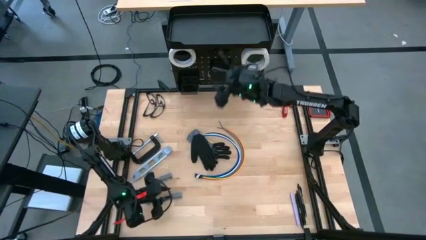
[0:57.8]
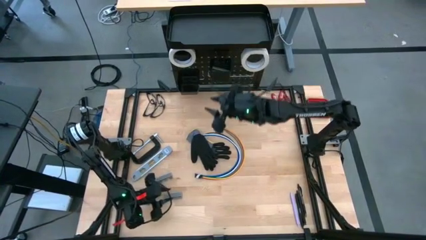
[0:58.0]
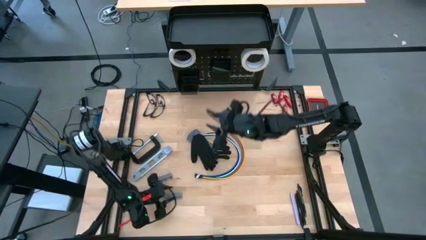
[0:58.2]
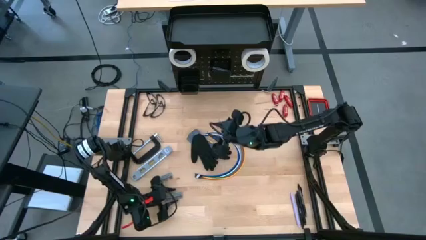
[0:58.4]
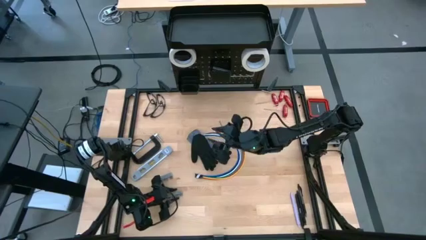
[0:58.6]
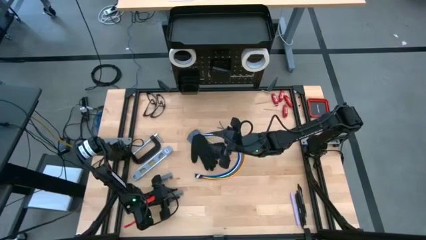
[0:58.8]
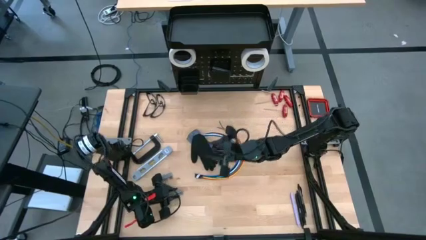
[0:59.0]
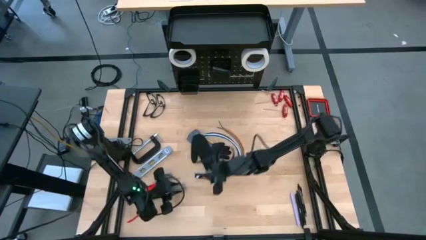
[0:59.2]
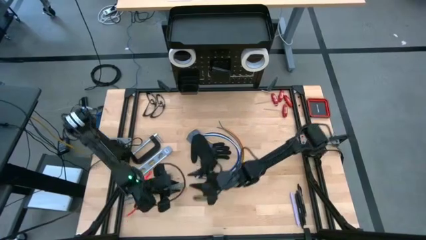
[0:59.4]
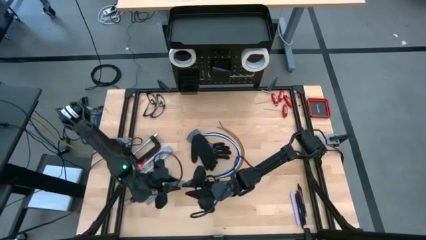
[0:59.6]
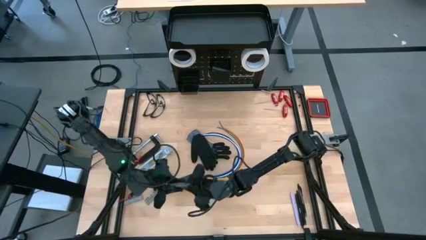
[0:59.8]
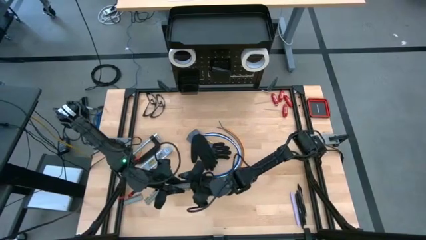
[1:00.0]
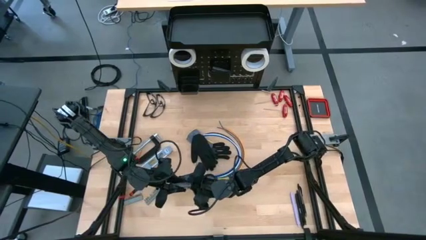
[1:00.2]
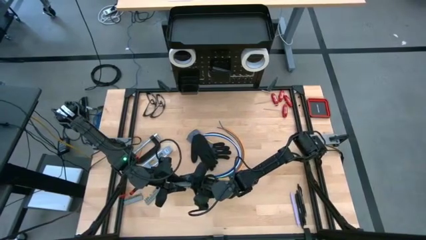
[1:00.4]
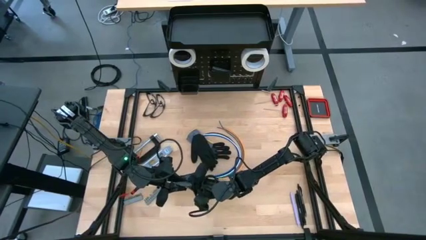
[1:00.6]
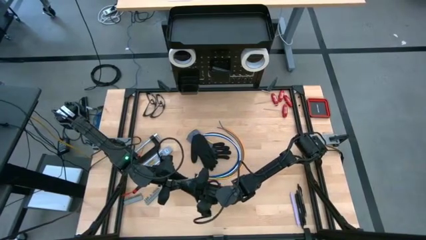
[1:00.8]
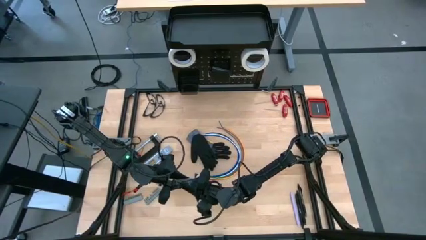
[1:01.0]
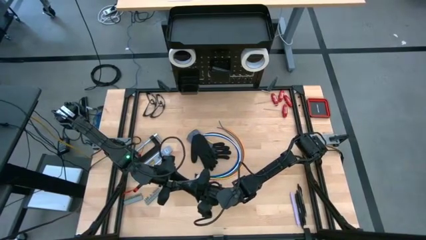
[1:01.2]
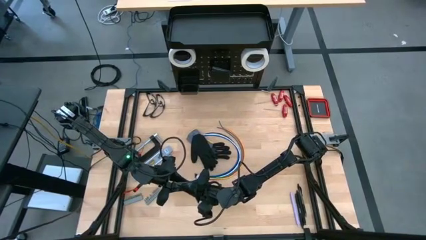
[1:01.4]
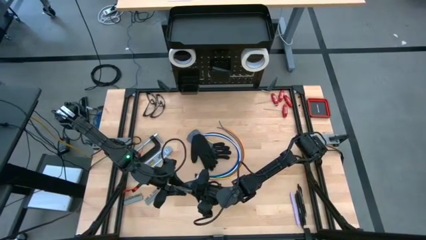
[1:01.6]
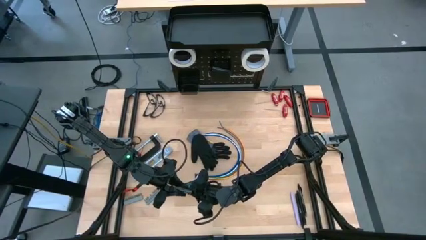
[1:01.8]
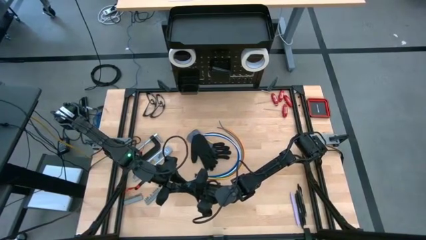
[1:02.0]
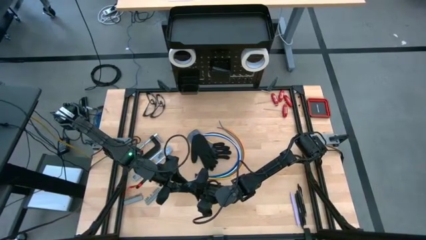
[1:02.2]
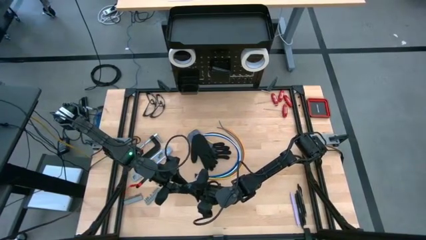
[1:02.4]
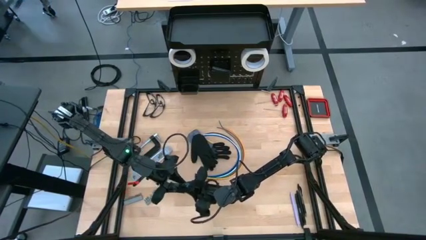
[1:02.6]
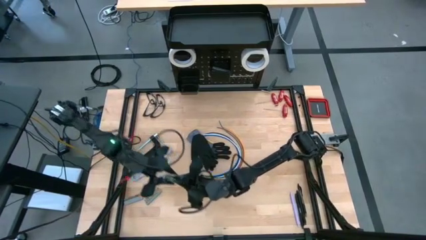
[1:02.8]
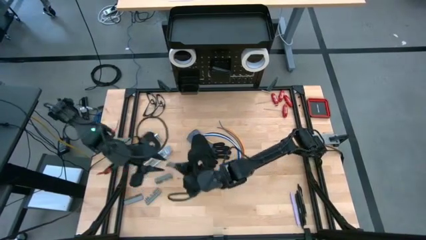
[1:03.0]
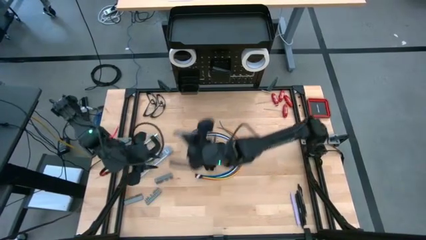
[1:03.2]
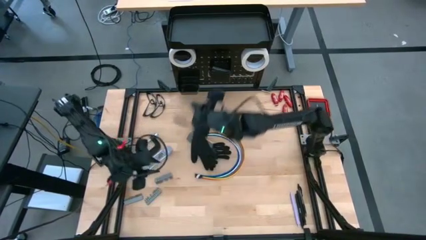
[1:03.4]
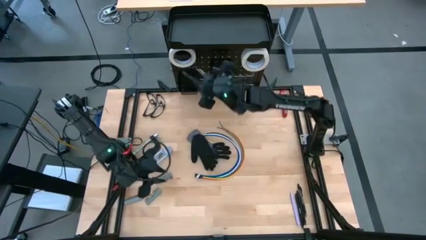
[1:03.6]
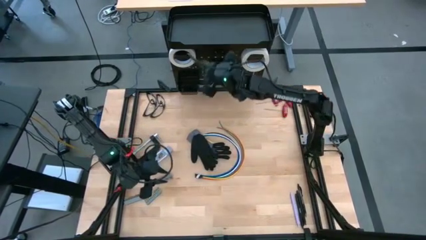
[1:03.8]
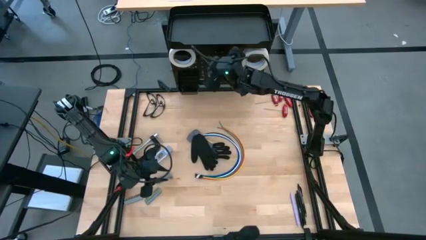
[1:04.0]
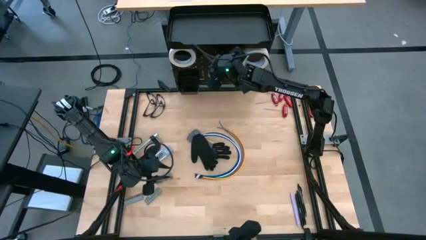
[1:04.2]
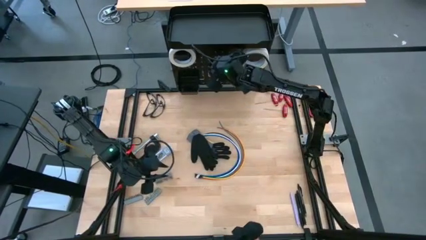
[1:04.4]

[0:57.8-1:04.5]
Task: Hang tools onto peg board
Put the terminal block into the black bin on the peg board

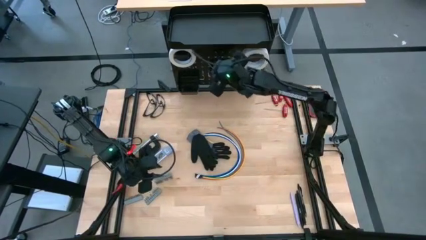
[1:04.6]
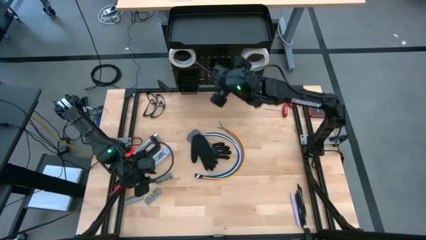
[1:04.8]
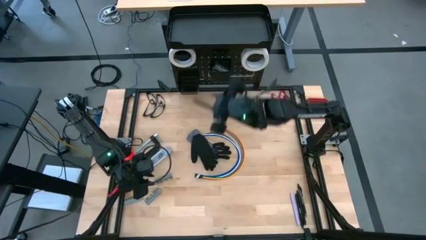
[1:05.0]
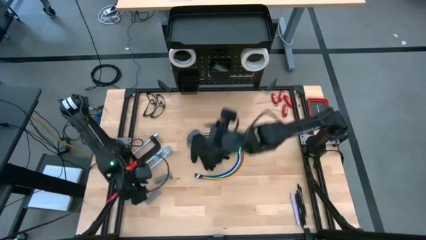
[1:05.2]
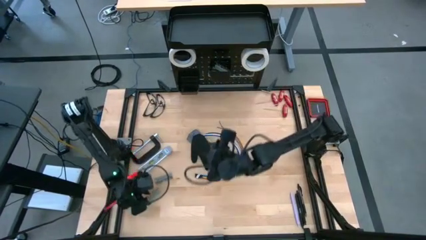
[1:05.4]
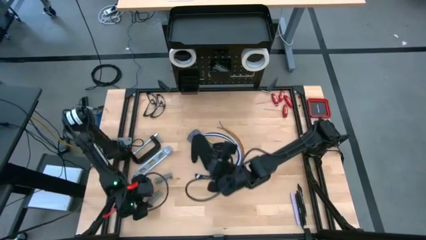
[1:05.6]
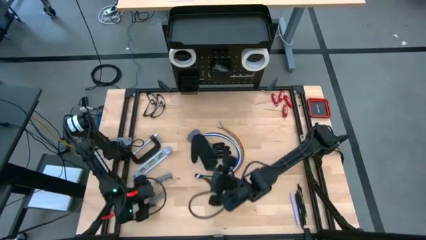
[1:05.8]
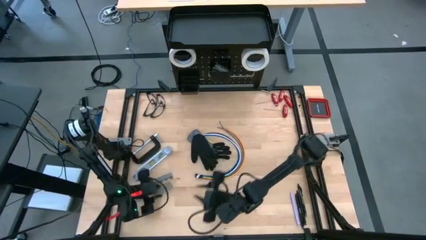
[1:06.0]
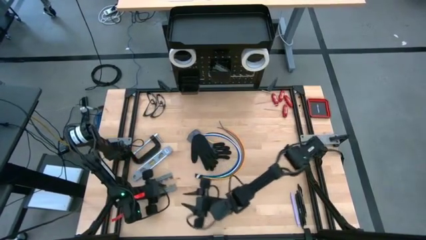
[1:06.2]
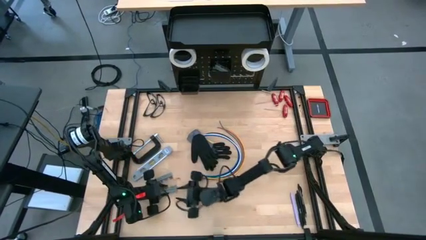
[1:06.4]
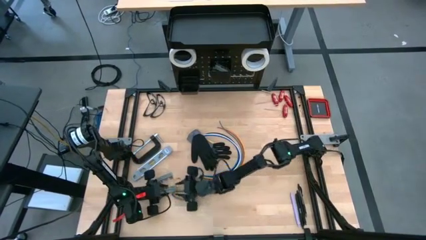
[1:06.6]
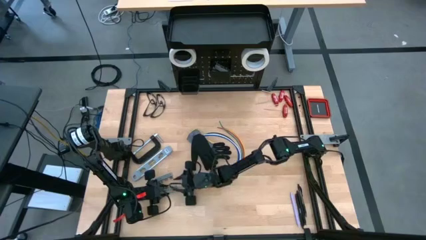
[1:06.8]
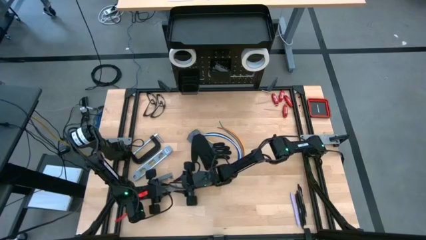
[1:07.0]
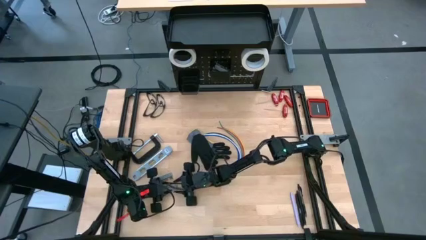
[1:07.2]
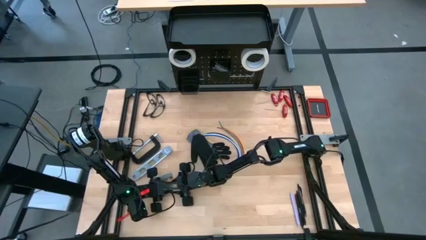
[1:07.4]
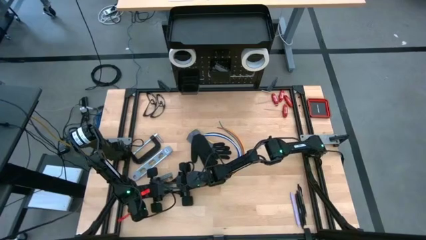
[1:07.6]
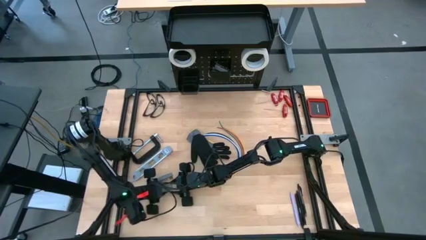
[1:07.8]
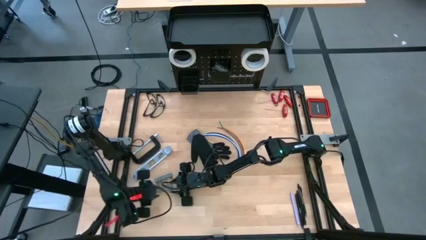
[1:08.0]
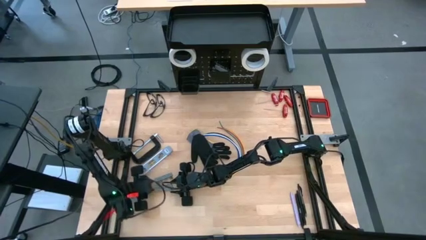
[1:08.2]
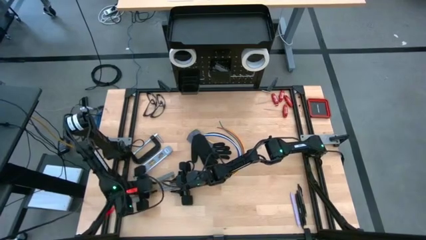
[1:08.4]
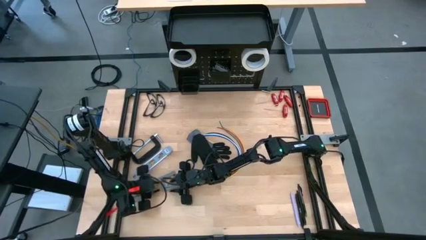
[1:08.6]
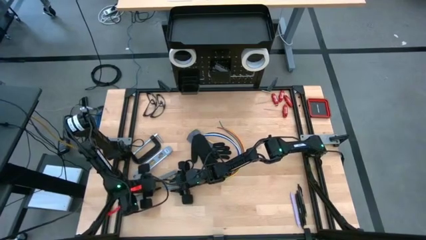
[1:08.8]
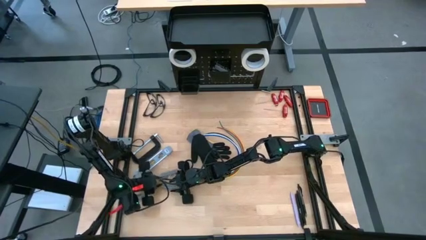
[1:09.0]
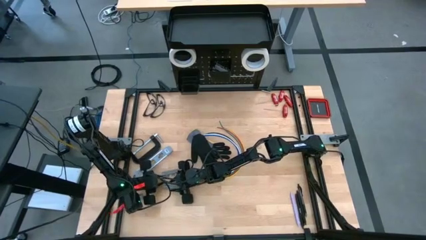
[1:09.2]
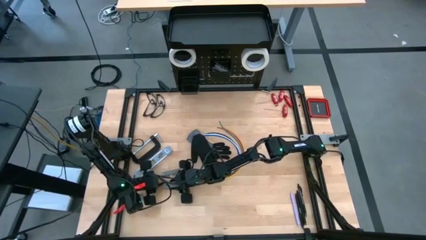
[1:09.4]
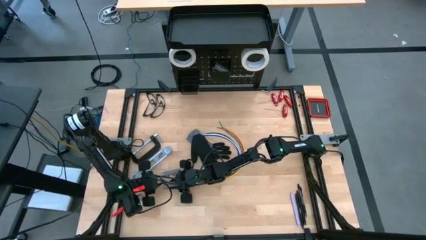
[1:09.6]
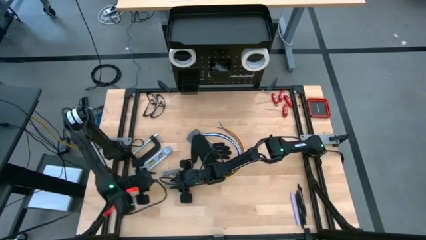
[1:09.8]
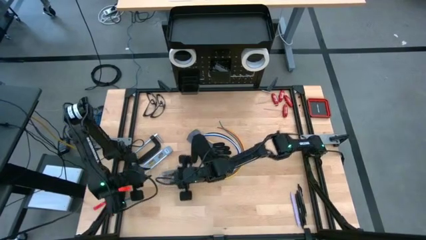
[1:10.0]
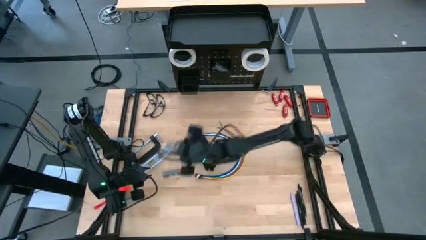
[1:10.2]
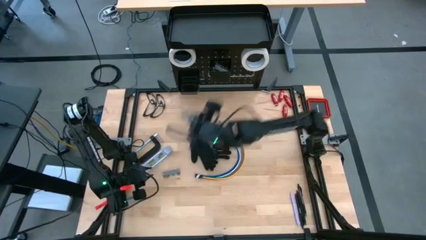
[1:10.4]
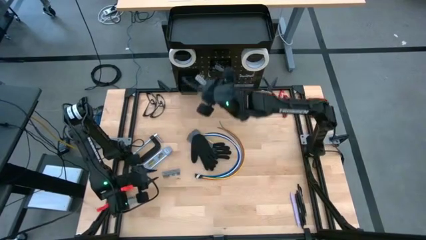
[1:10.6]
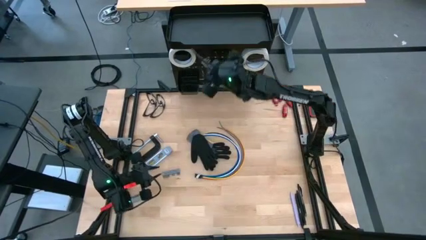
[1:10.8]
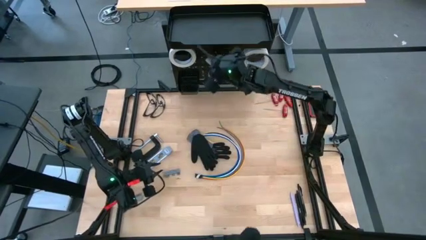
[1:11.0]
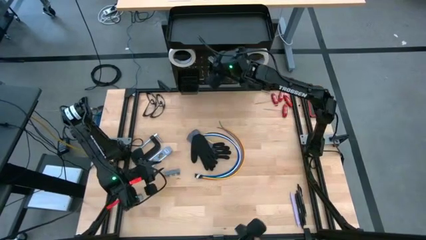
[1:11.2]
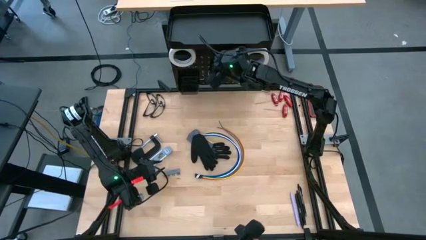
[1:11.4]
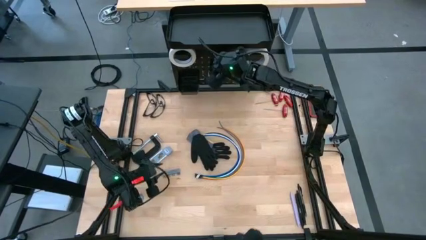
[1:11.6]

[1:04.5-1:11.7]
Put the terminal block into the black bin on the peg board

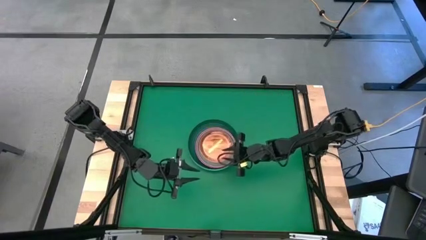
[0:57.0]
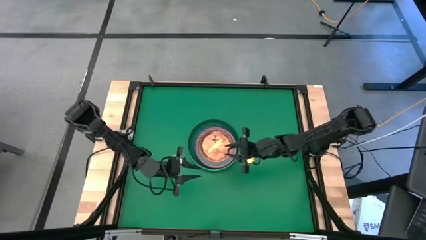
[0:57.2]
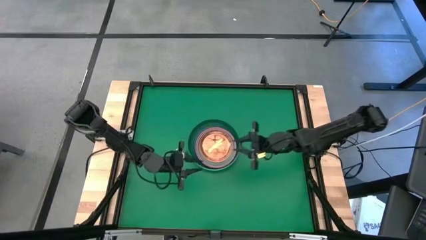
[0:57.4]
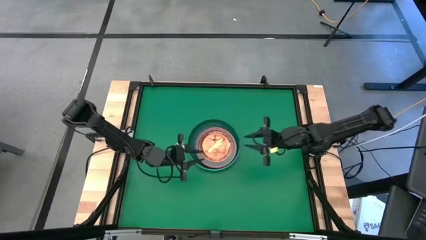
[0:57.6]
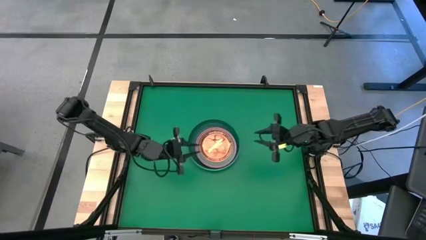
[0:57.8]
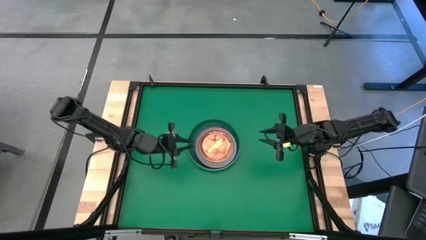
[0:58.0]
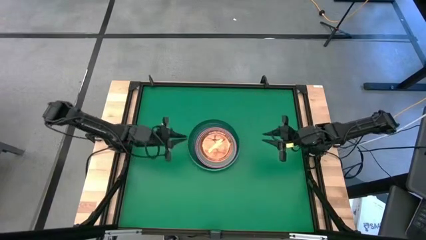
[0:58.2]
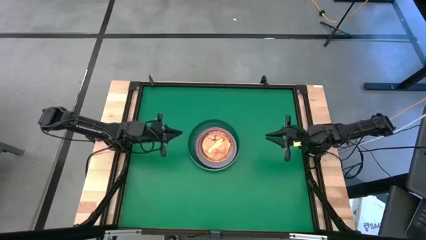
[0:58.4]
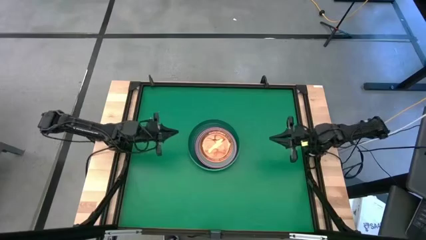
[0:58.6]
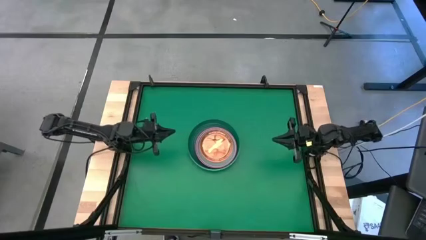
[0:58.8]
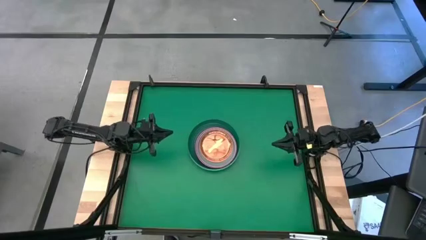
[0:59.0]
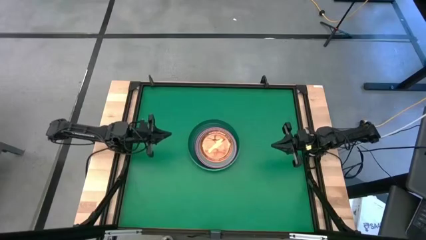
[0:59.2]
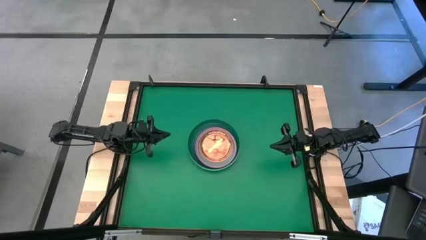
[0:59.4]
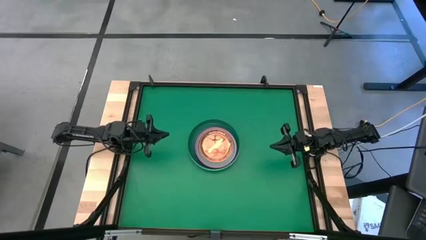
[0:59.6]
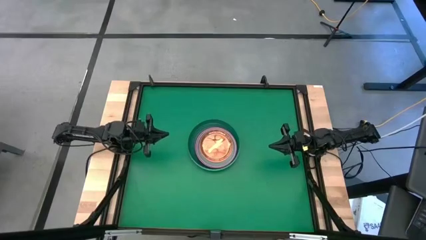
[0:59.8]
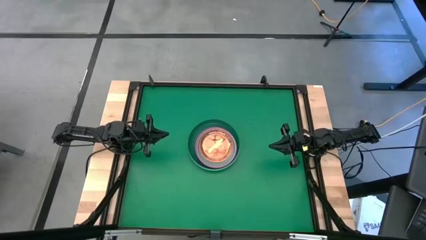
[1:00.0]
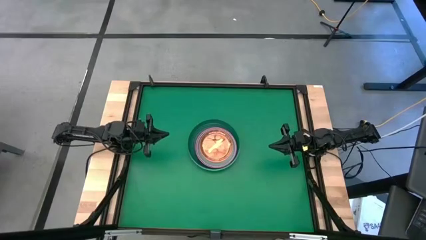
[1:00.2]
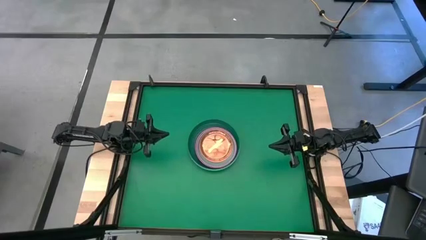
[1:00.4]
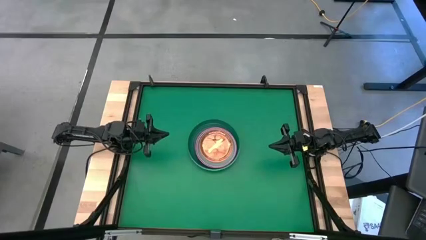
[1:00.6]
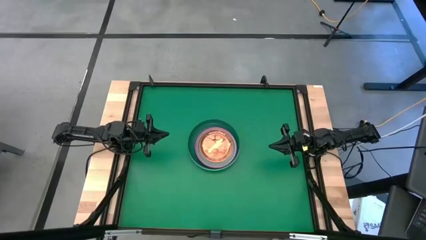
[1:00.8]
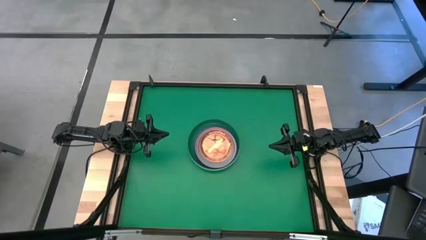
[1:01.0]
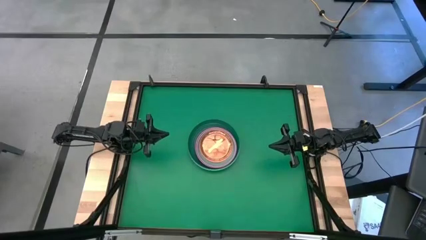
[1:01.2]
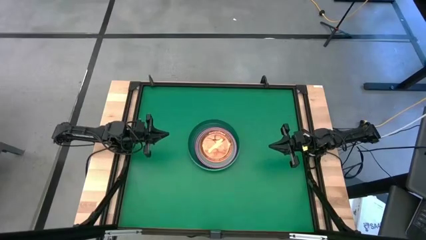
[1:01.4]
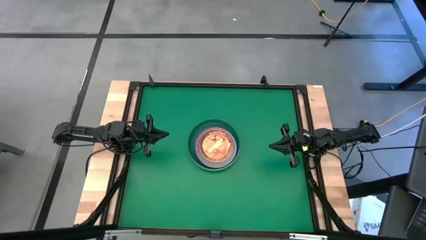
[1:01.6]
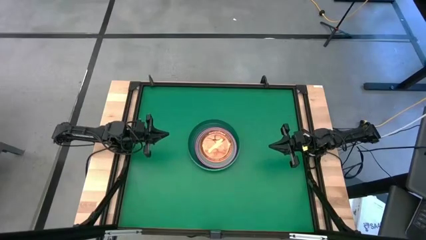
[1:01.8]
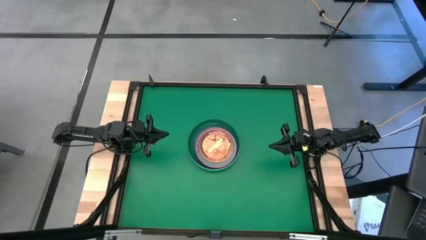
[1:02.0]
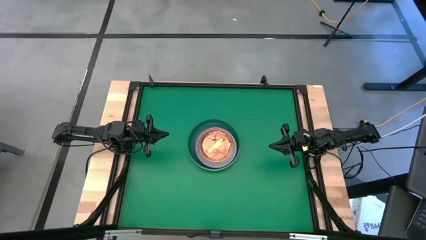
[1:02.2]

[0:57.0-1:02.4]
Task: Stack plastic plates
Return to Home Position
